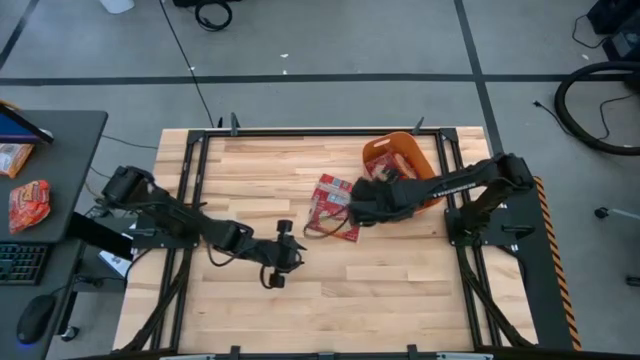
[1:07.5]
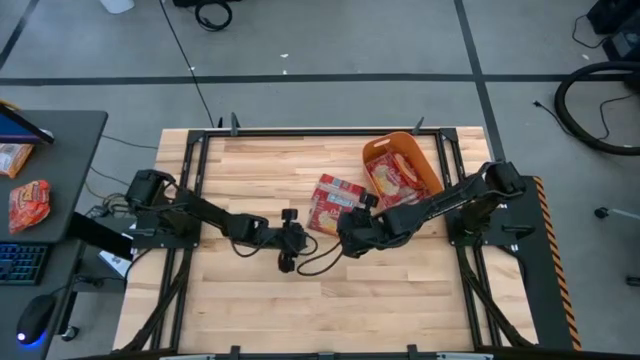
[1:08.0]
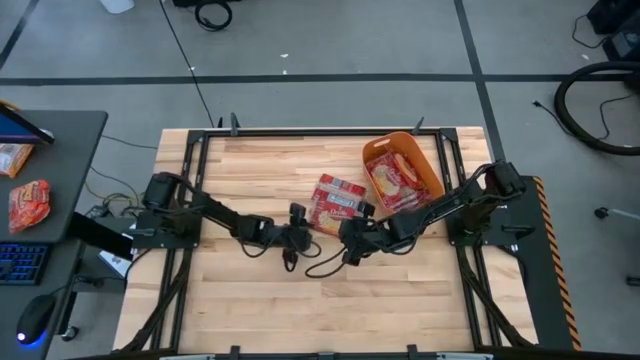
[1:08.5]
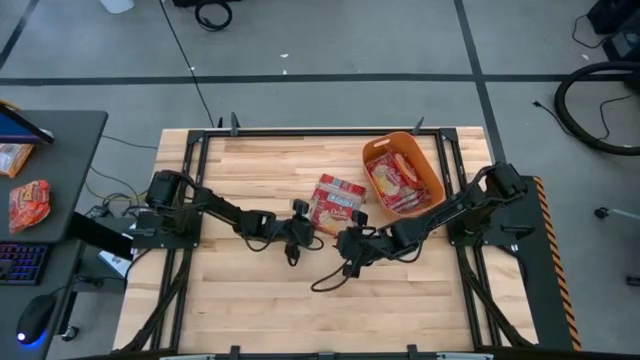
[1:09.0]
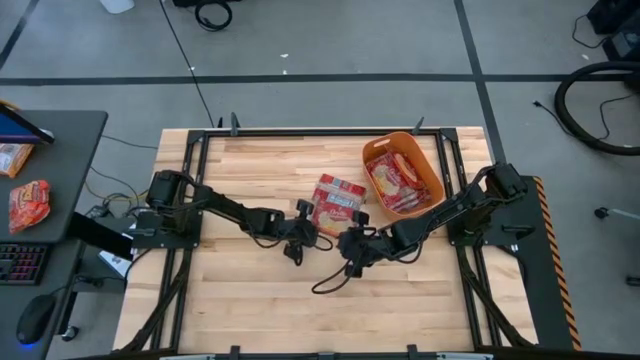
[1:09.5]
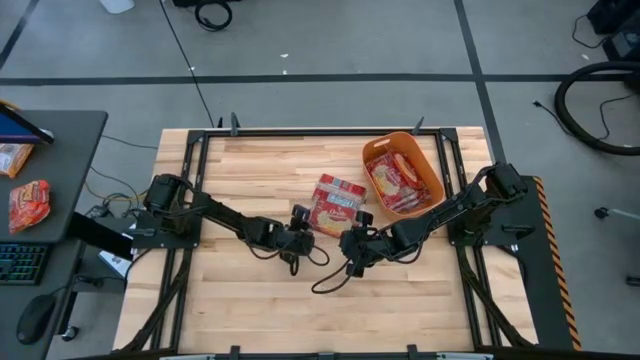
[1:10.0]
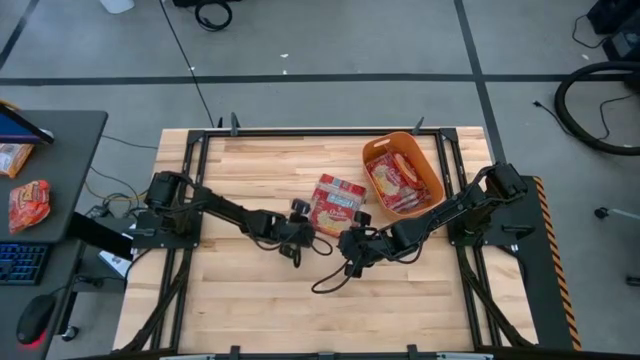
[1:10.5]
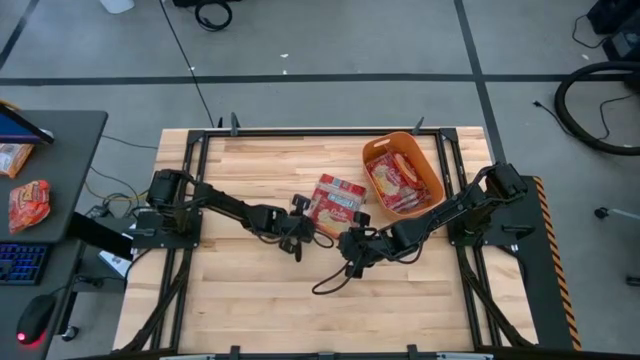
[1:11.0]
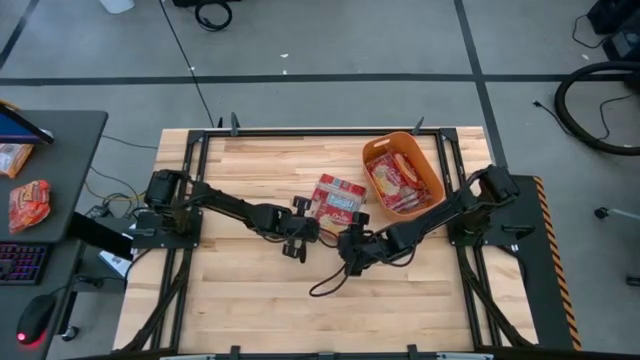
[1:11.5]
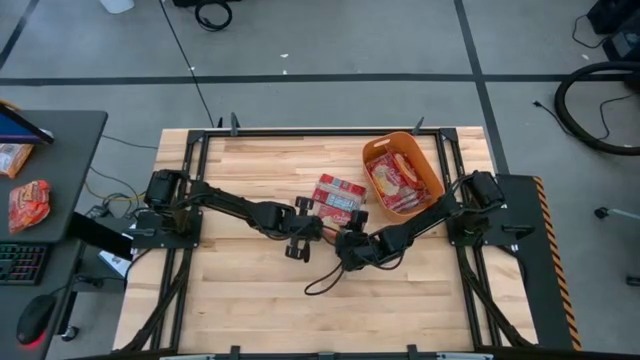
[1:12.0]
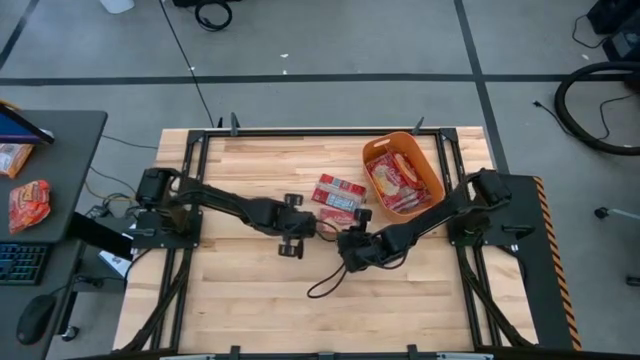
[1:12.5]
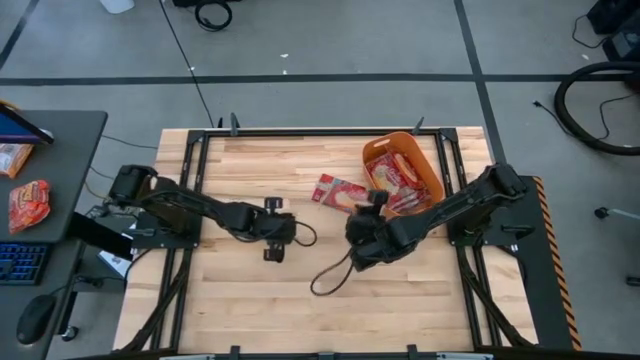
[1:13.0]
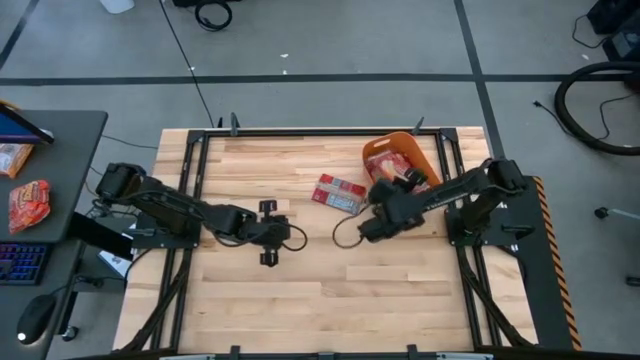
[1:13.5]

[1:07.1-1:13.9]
Task: Sort popcorn bags into baskets
Put the red popcorn bag into the orange bin

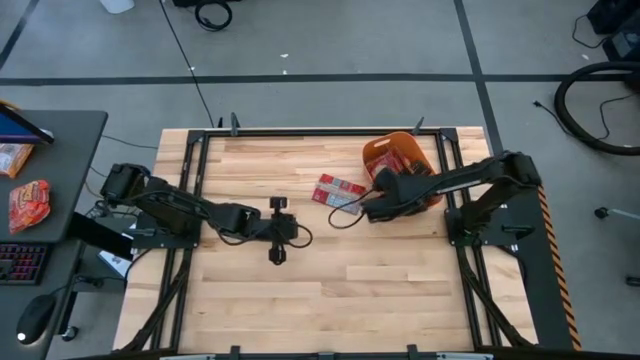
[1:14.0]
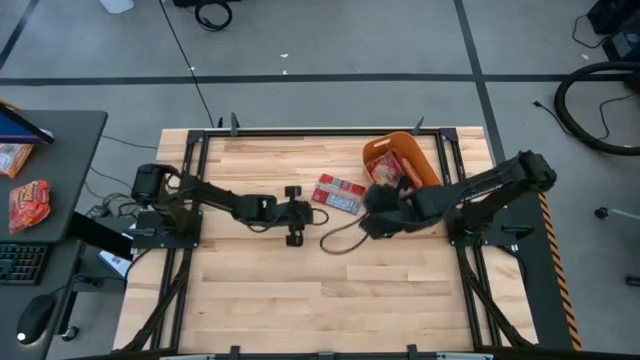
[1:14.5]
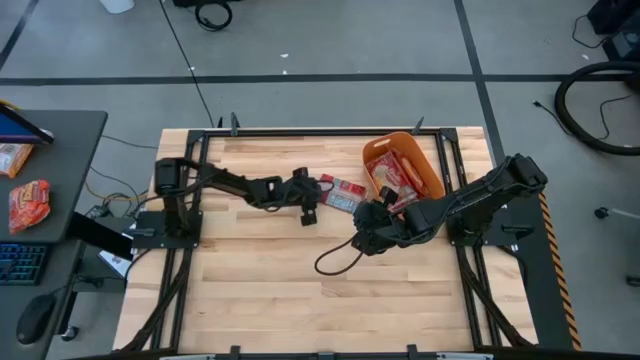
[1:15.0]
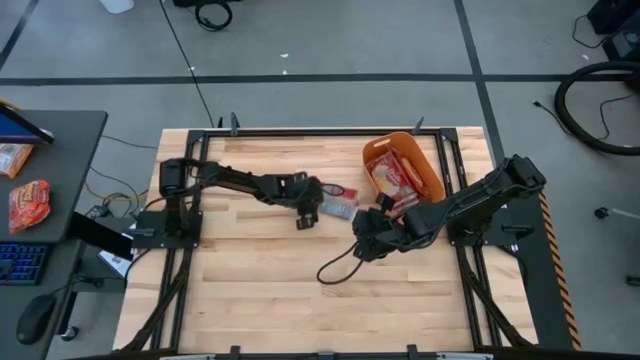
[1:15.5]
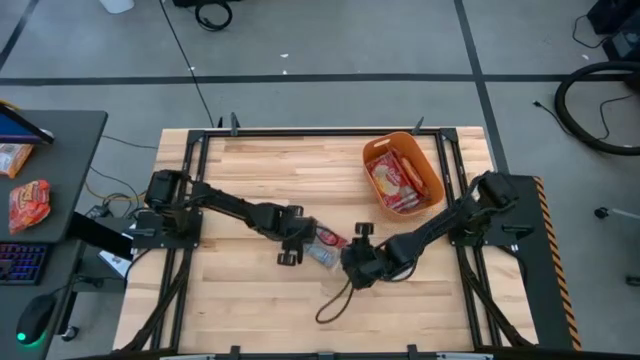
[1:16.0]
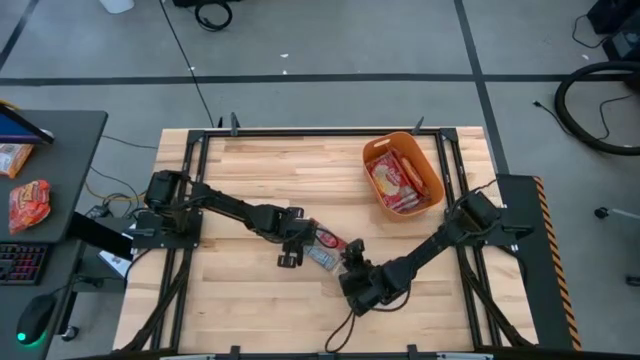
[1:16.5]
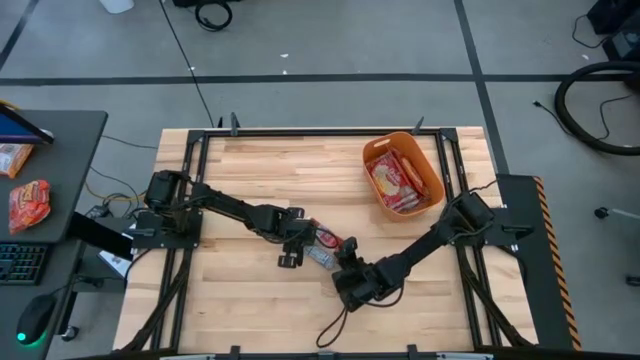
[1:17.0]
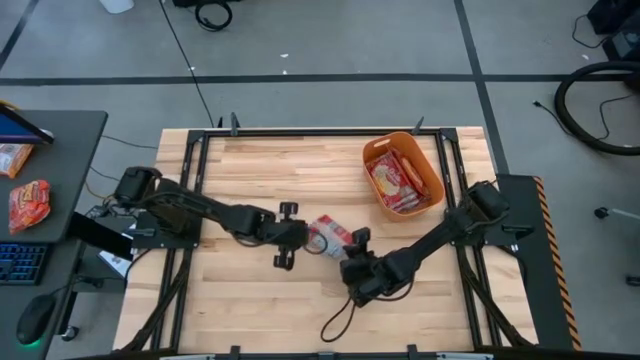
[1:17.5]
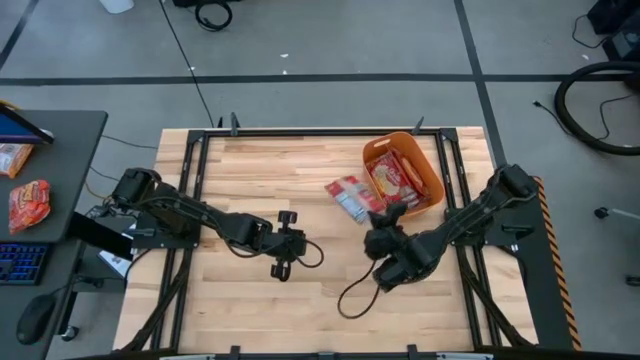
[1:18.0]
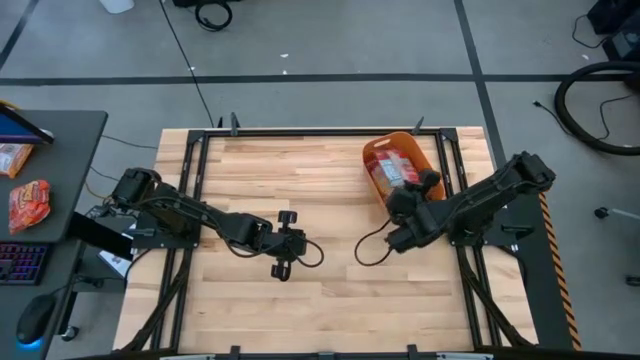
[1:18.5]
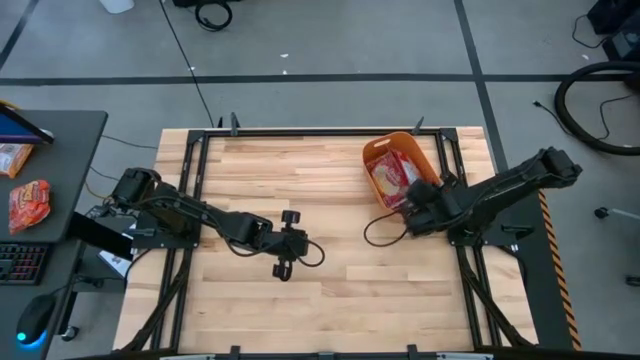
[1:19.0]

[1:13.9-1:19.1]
Put the red popcorn bag into the orange bin

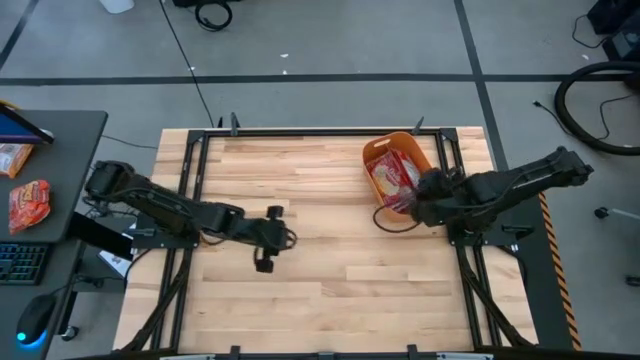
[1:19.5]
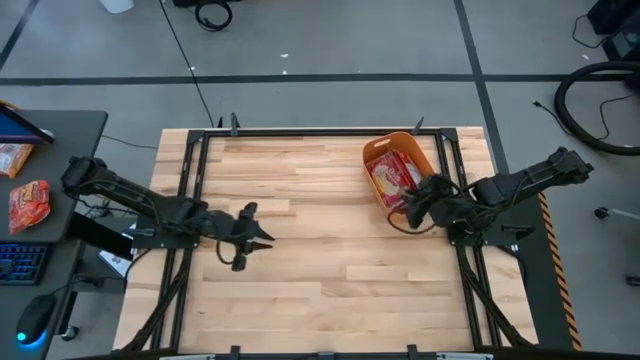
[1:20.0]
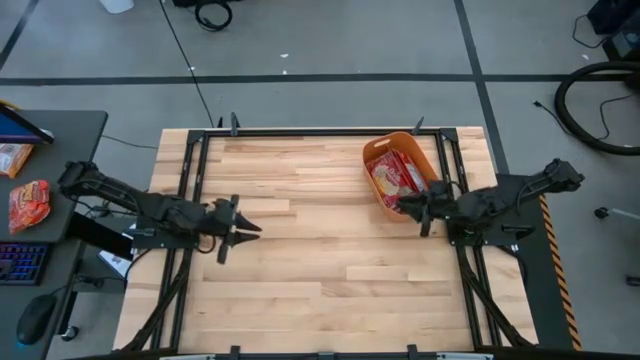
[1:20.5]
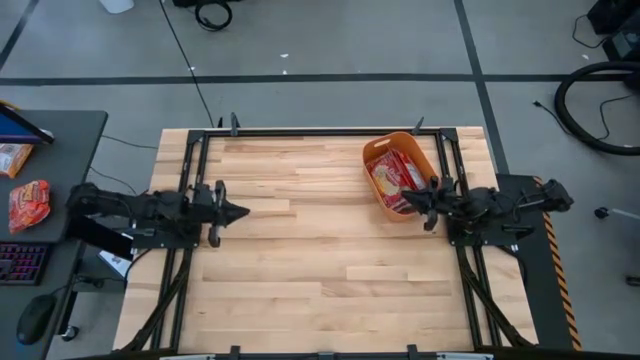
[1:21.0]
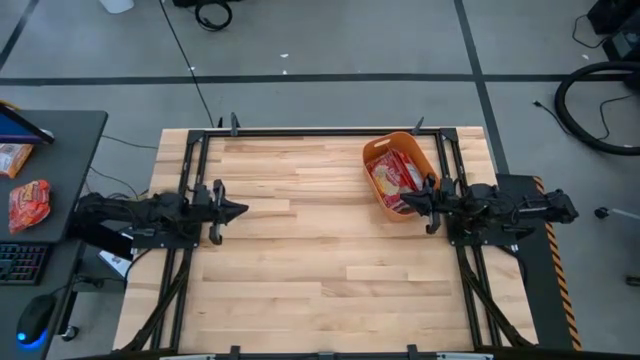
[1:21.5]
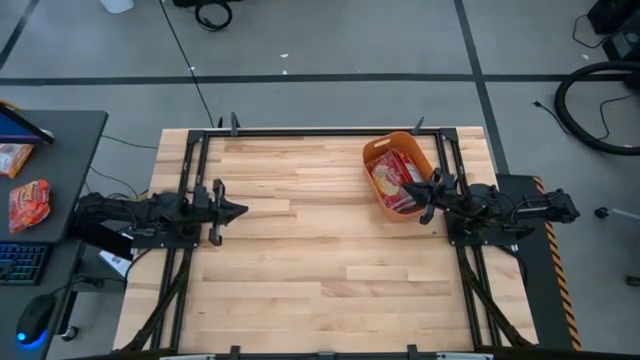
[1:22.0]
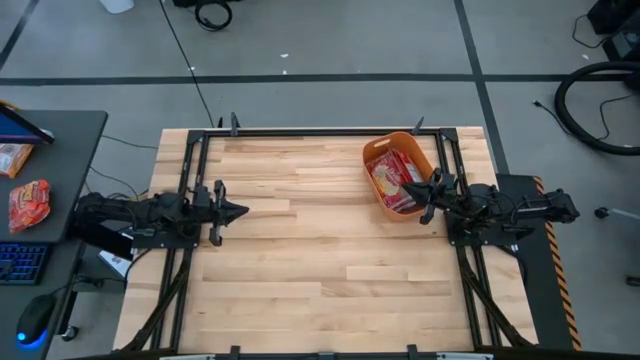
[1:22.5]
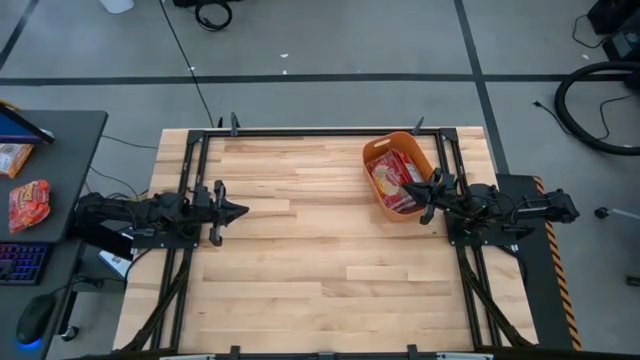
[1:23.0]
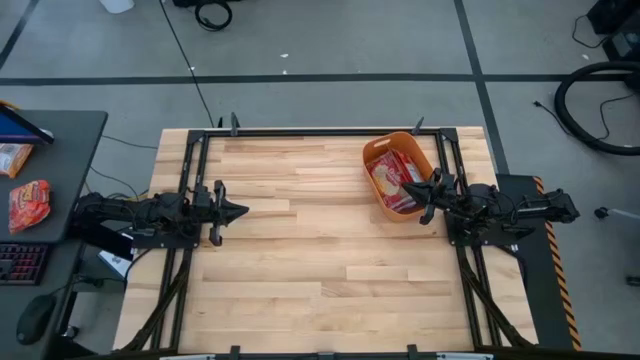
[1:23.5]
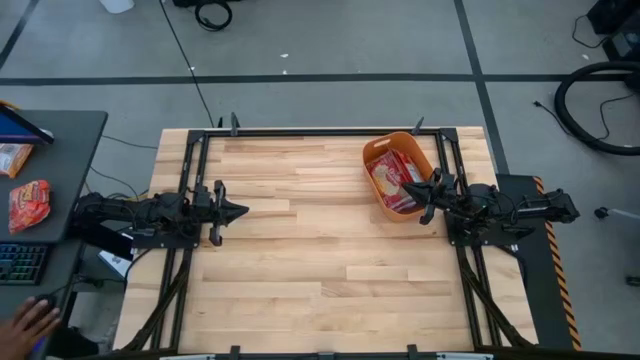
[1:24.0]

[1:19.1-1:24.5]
Return to Home Position

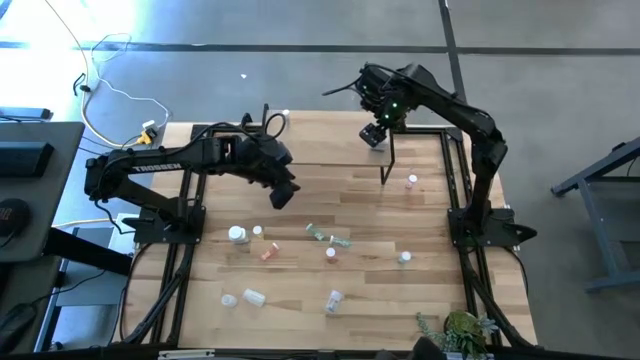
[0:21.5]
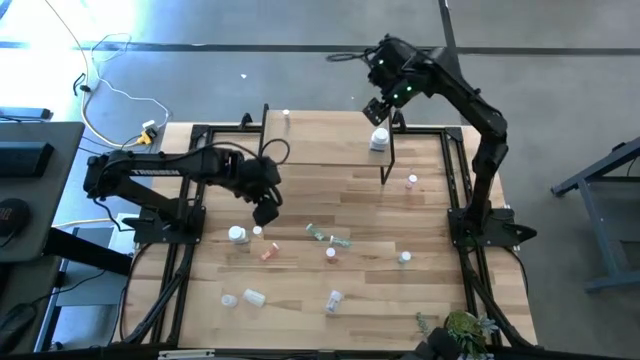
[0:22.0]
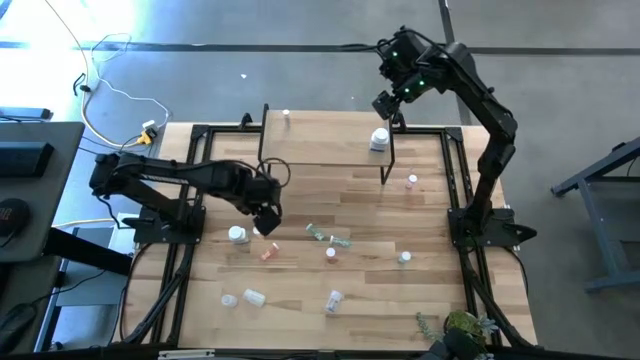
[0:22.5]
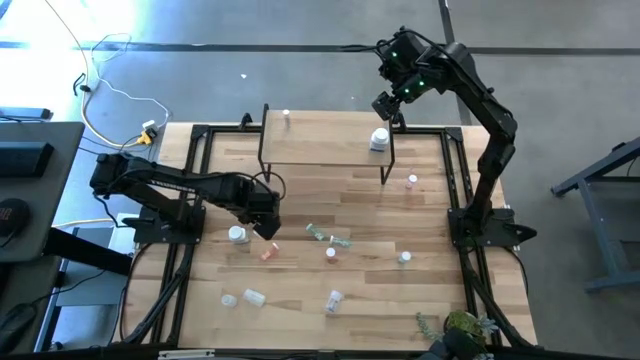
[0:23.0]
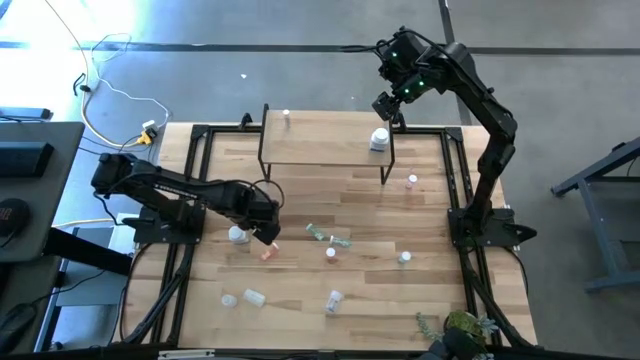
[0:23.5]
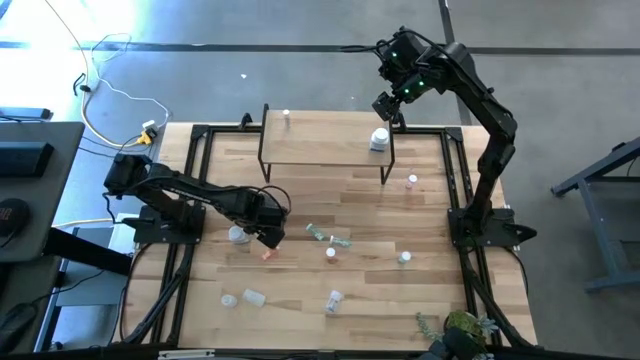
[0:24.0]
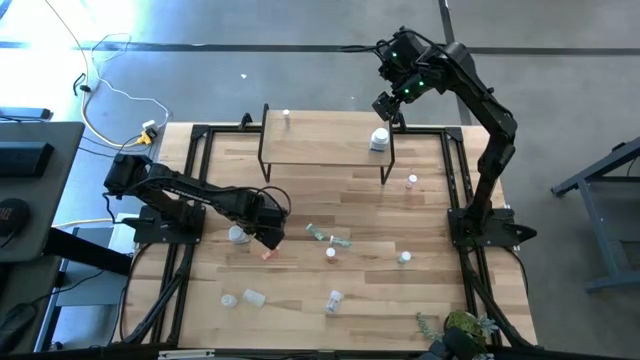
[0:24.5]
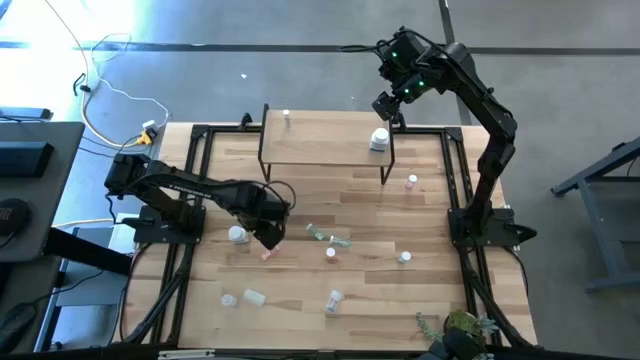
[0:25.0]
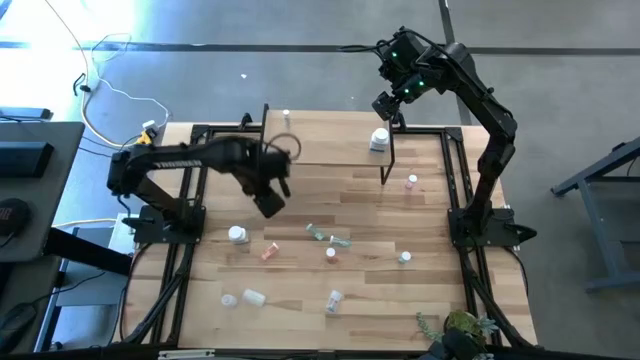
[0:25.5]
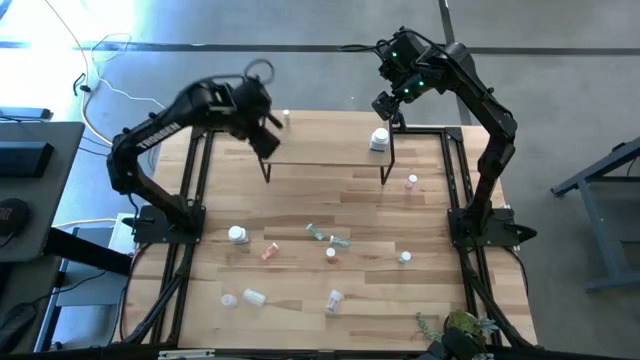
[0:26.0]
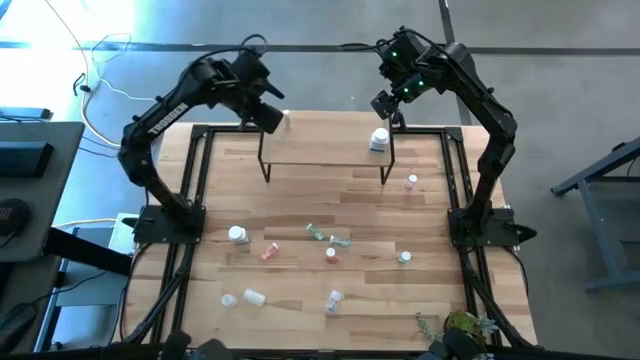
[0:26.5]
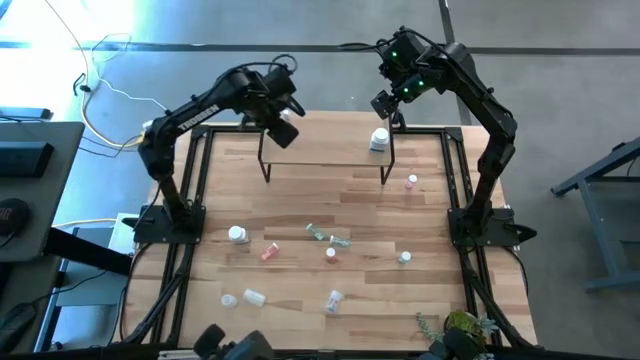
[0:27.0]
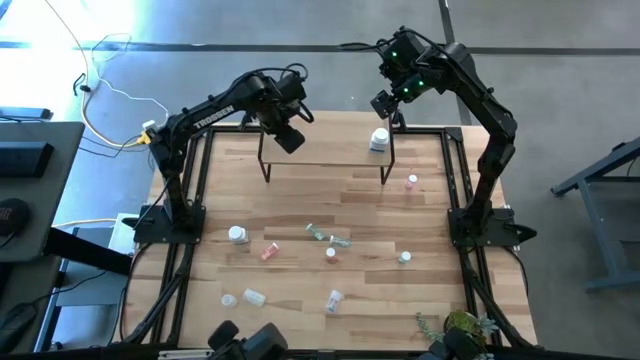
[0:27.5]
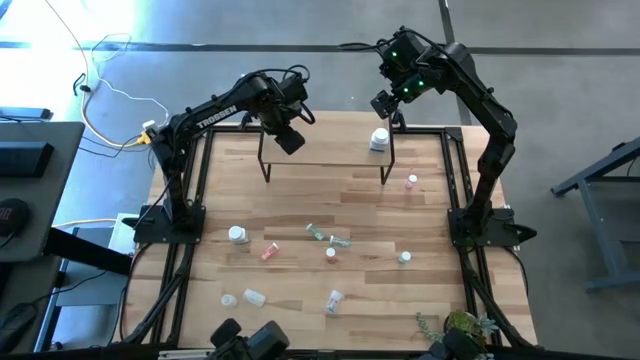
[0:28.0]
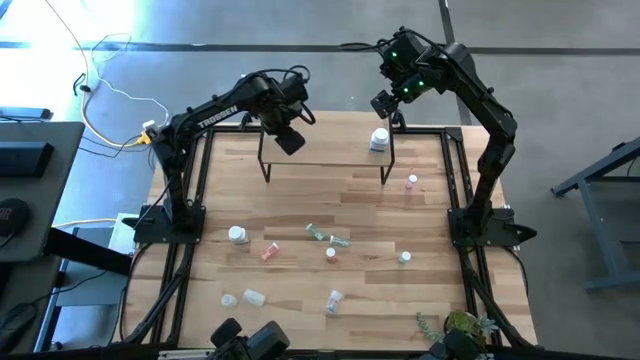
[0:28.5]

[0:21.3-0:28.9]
Task: Pick and place medicine bottles onto shelf by color
Put the light yellow pill bottle on the shelf
